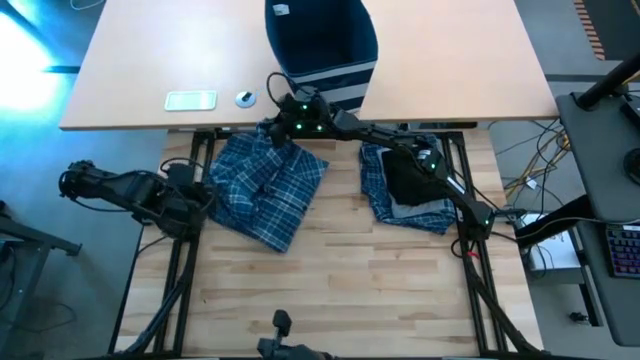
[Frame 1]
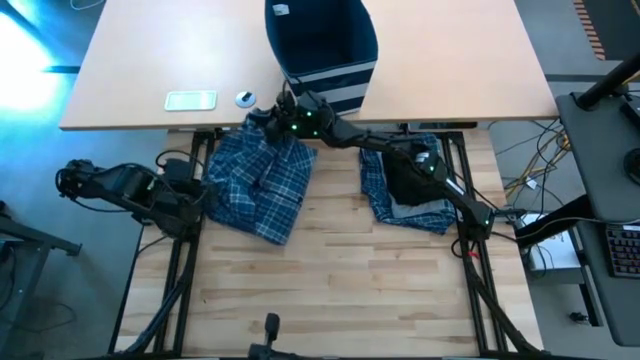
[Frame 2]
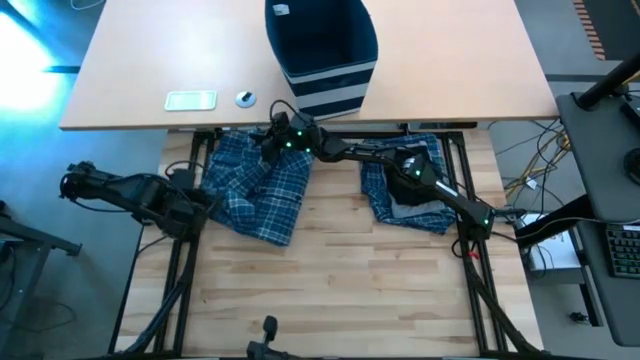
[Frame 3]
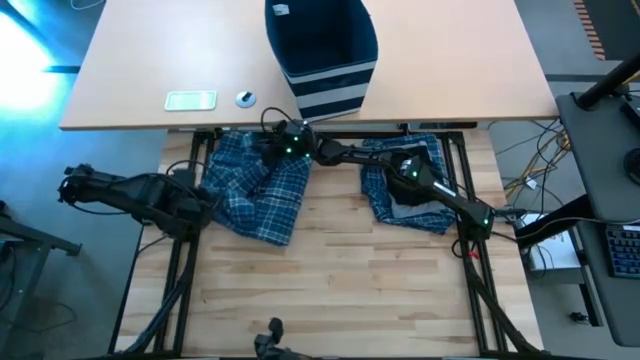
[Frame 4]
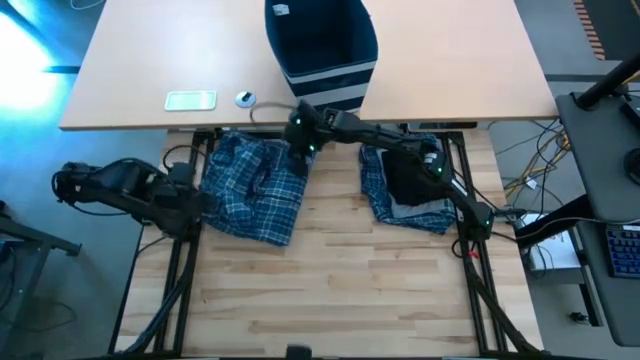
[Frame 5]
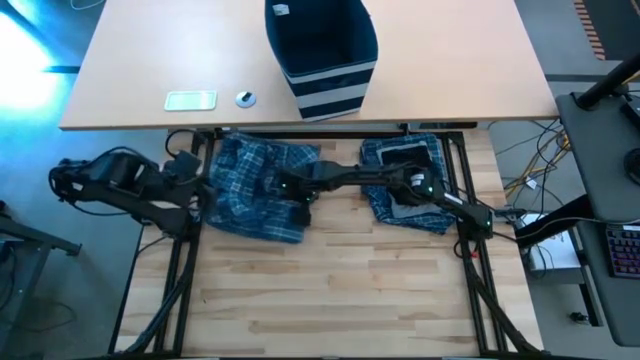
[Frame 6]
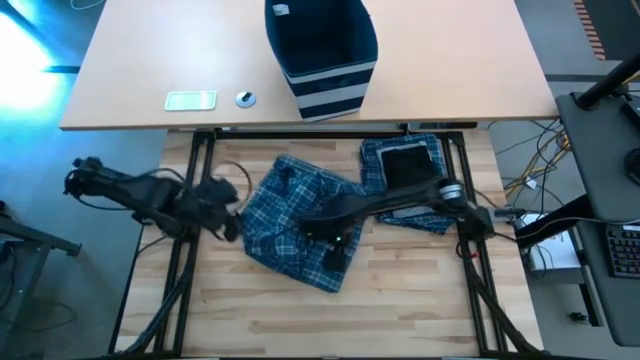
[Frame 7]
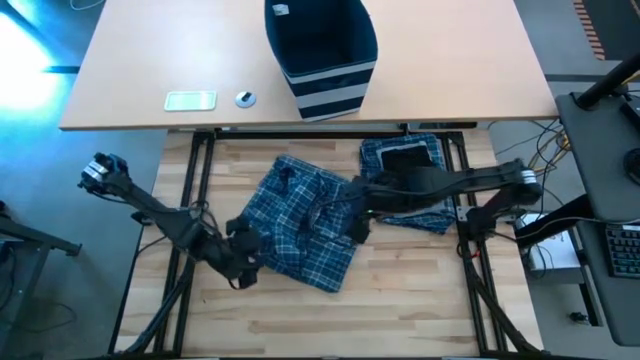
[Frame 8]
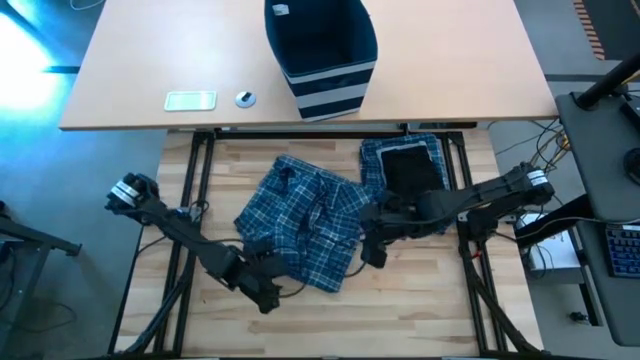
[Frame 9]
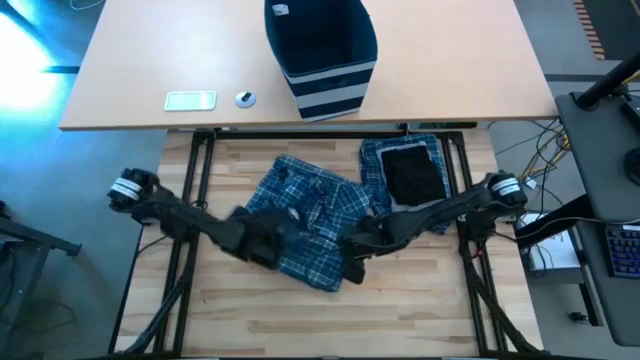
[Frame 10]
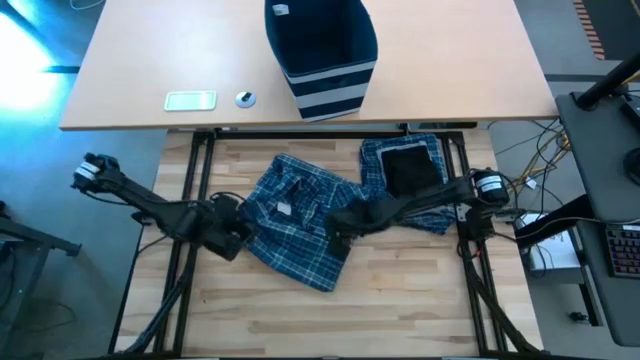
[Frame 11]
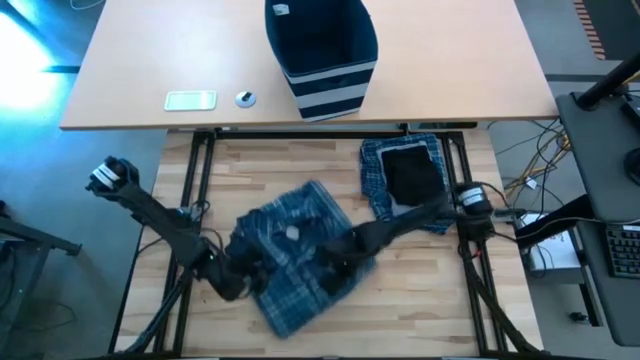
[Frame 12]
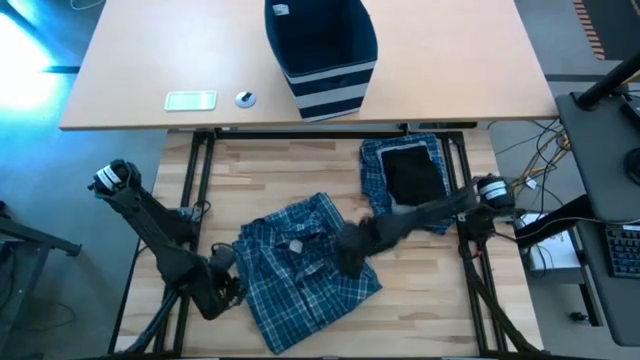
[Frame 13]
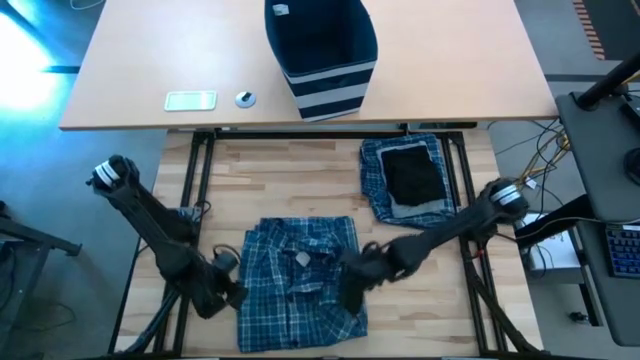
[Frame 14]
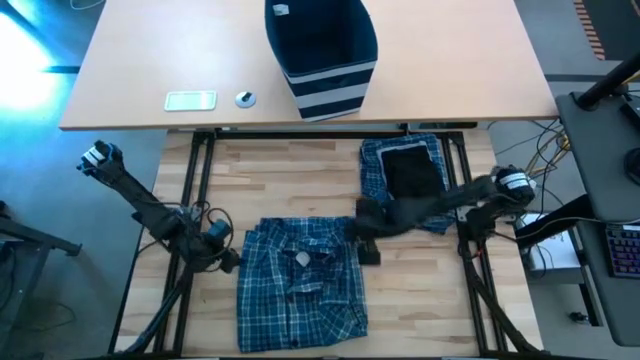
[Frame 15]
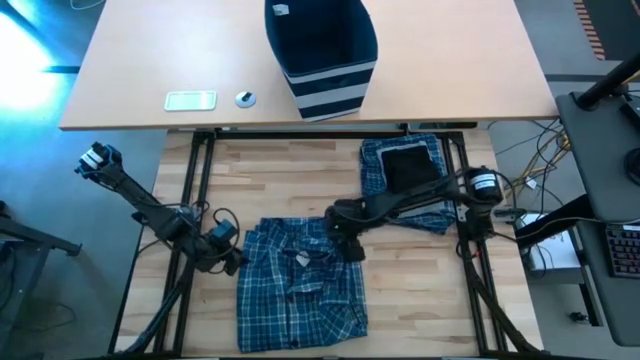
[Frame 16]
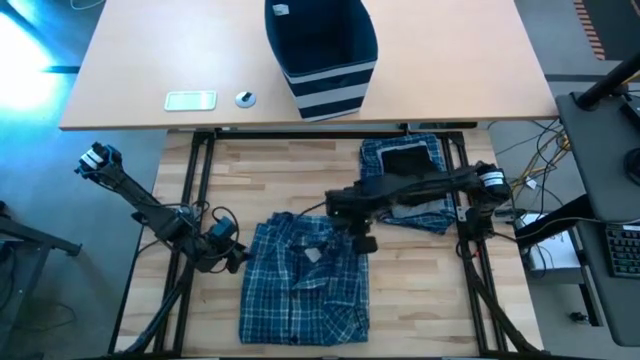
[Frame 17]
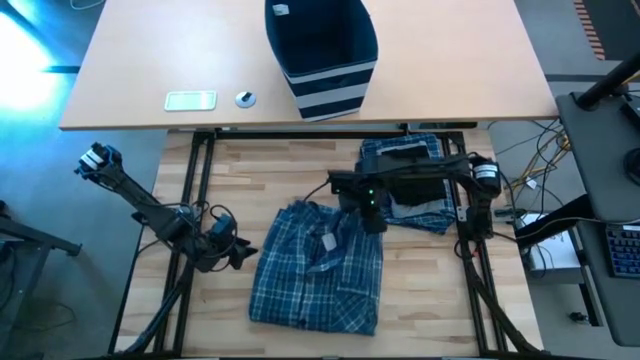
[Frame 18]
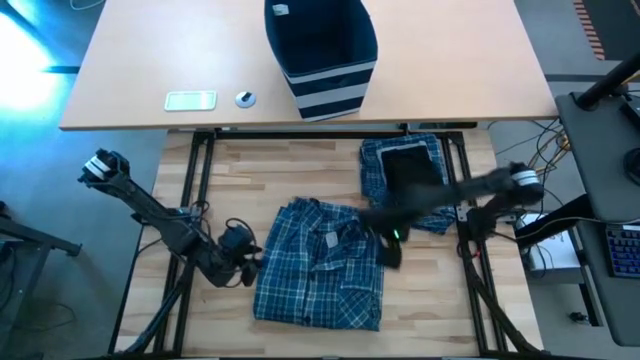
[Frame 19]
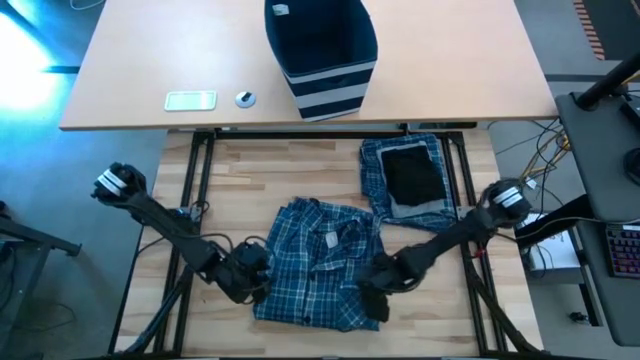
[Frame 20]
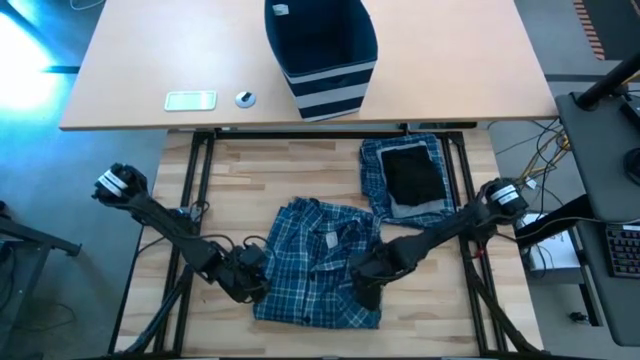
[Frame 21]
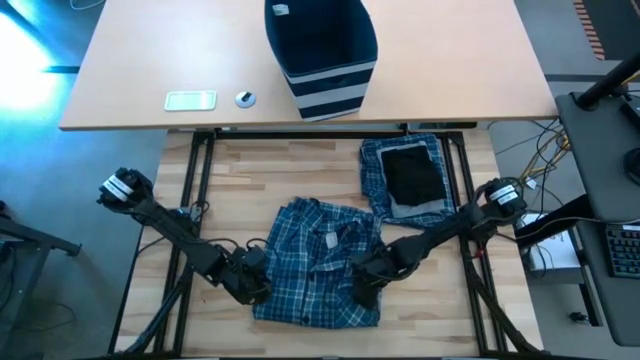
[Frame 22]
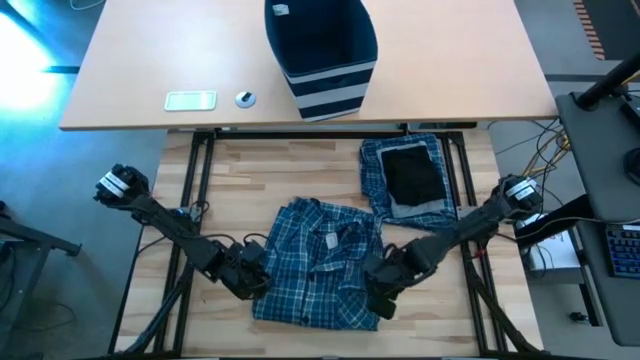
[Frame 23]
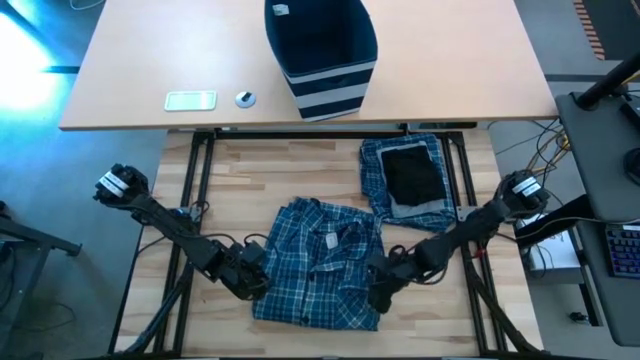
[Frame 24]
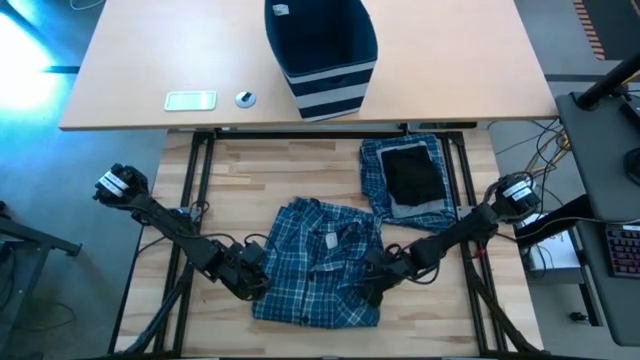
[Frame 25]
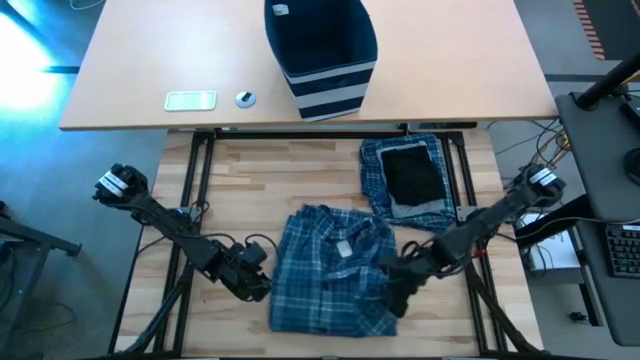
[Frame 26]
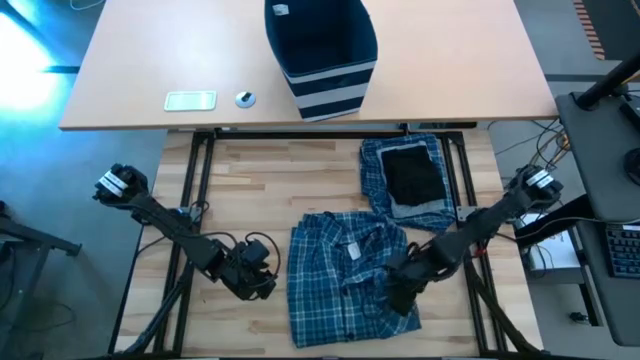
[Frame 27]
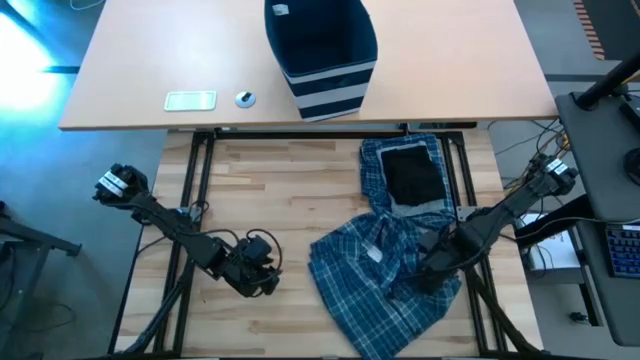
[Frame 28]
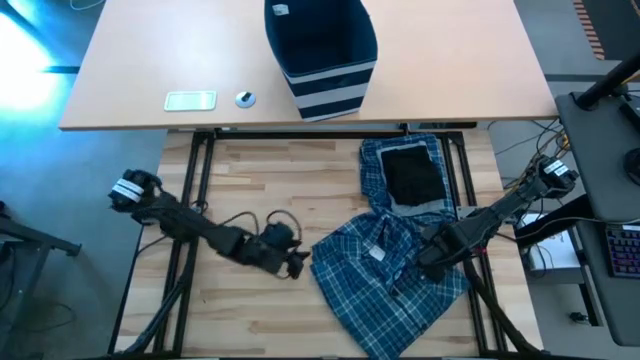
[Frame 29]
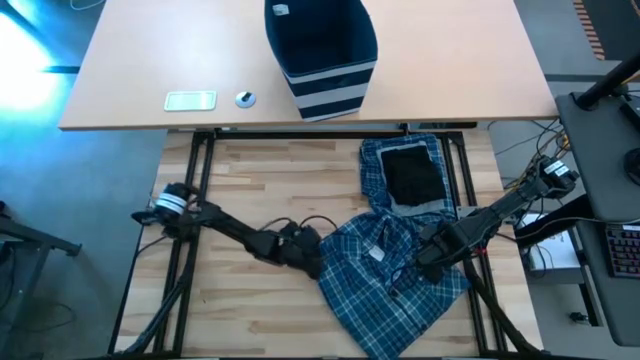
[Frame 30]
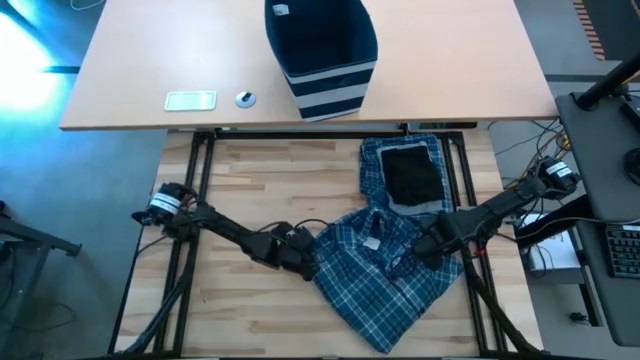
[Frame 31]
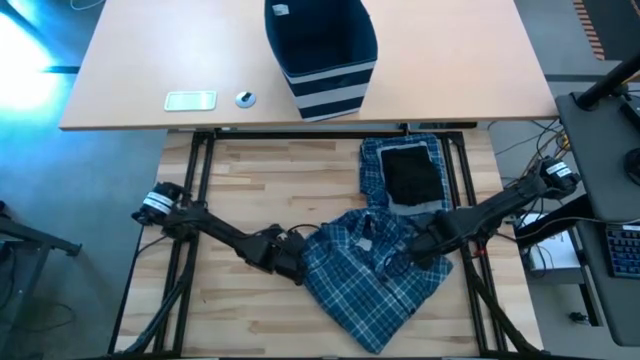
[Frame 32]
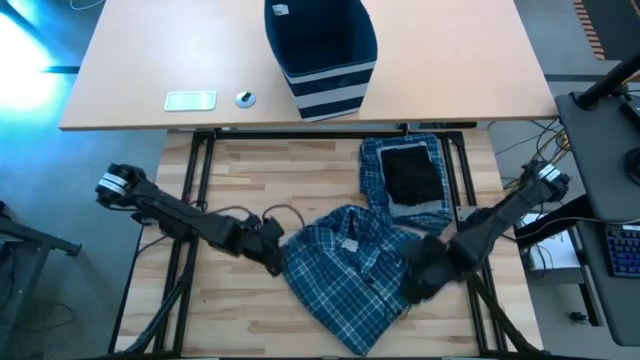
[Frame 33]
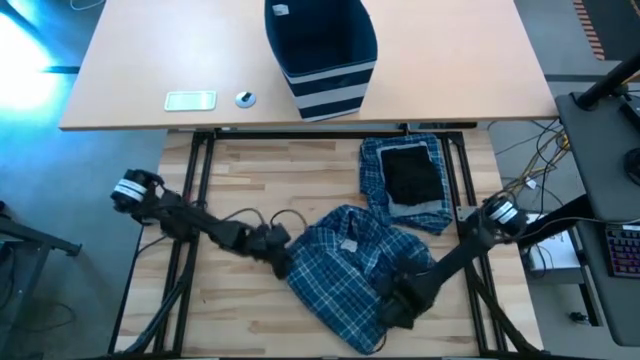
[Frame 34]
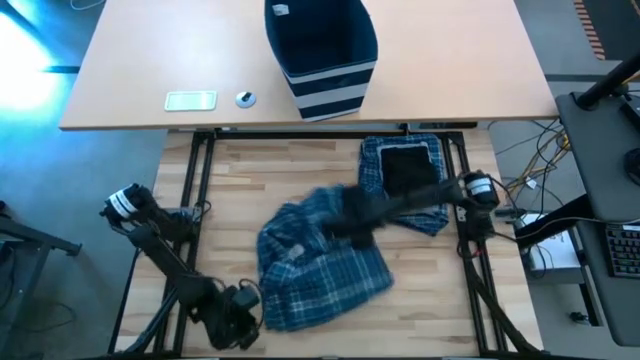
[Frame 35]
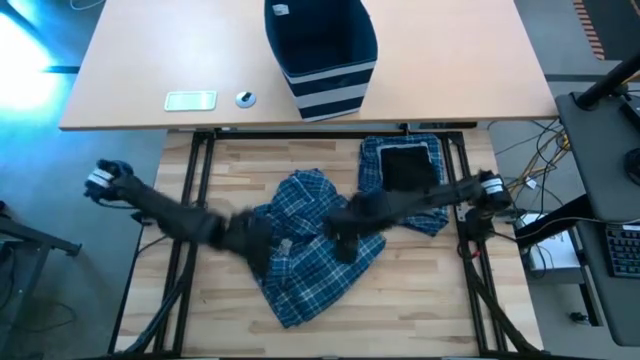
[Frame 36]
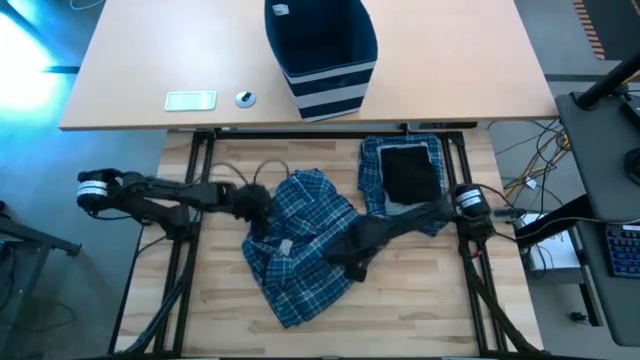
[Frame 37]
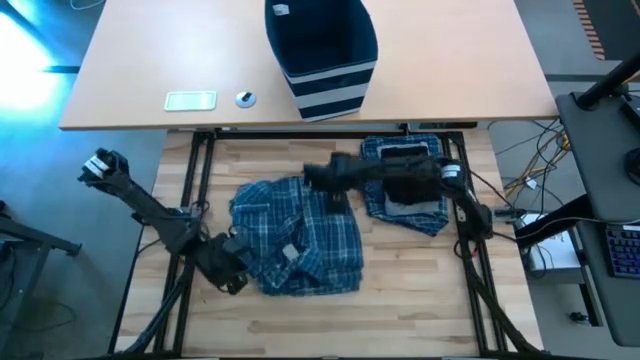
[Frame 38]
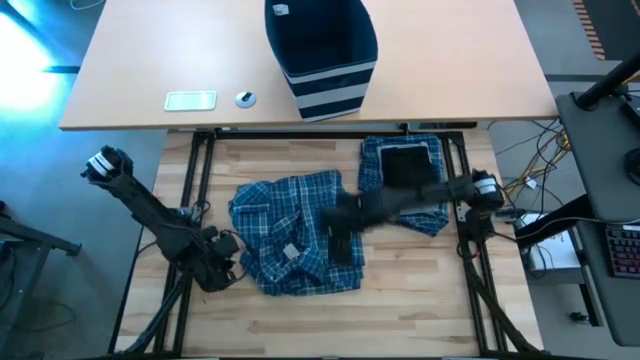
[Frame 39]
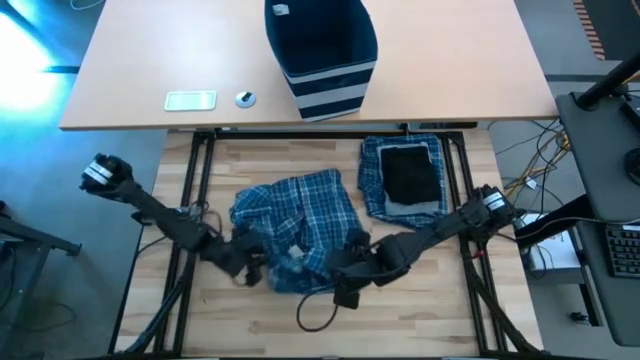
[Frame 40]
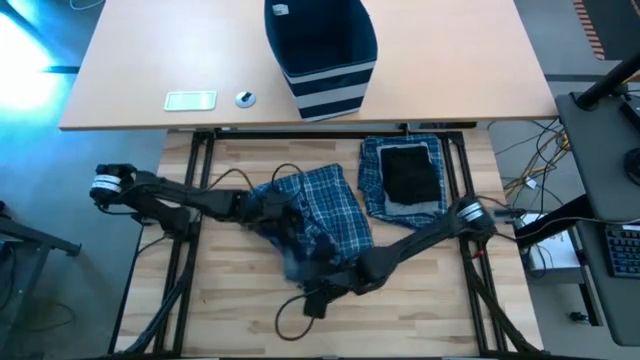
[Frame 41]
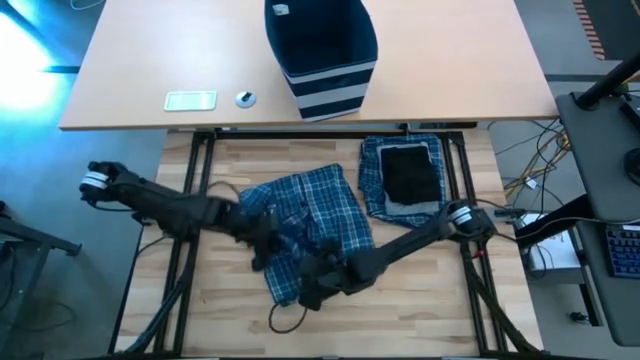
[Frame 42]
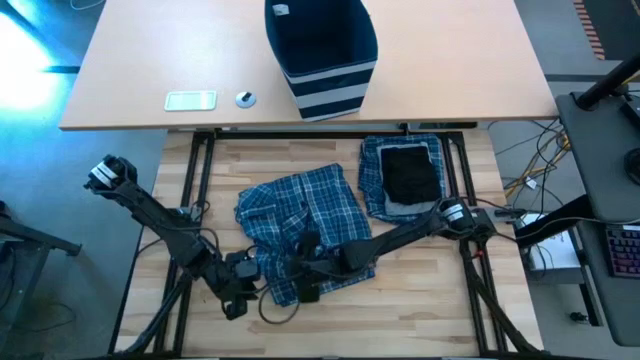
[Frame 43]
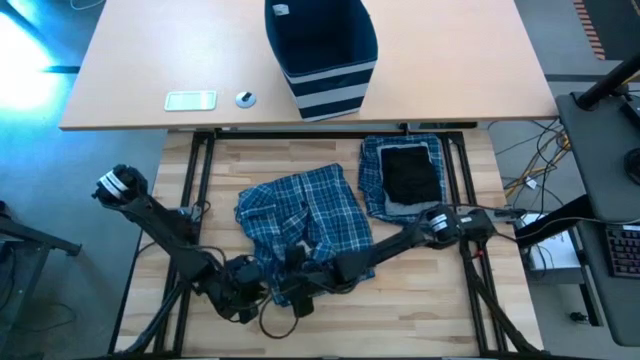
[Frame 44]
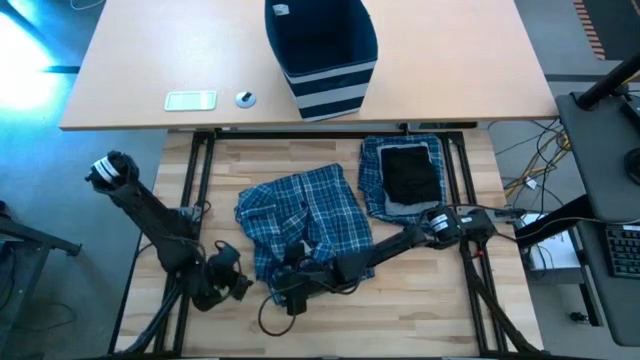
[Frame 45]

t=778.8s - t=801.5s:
Task: Fold Laundry from Bin
Fold the blue patterned long sleeve
